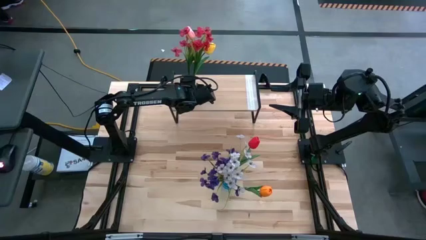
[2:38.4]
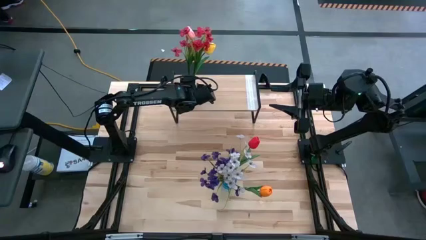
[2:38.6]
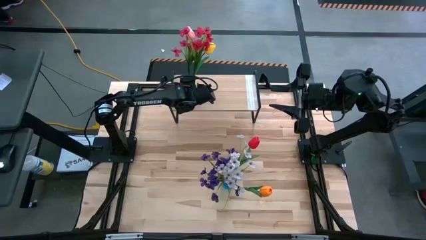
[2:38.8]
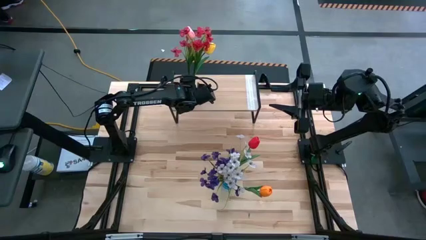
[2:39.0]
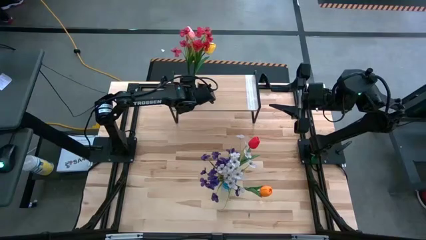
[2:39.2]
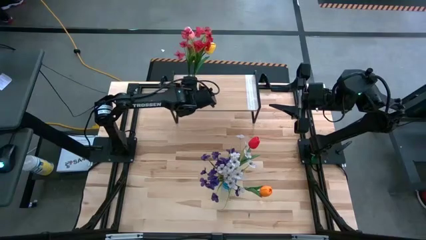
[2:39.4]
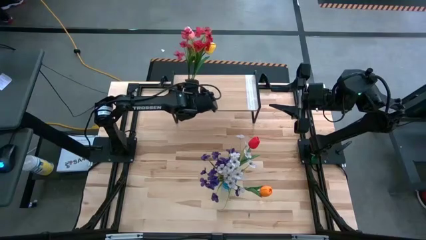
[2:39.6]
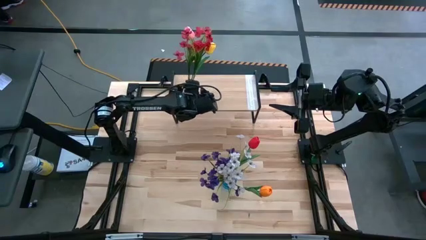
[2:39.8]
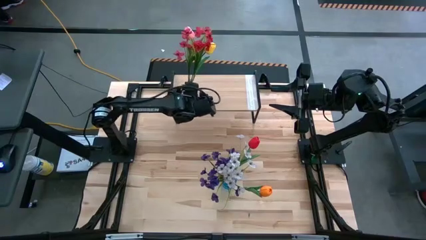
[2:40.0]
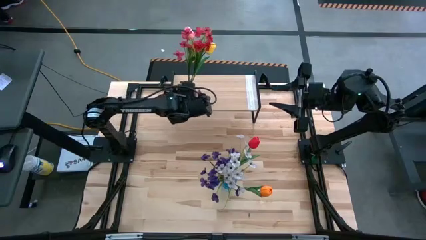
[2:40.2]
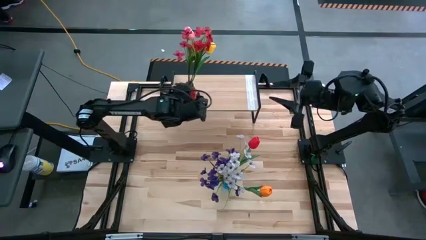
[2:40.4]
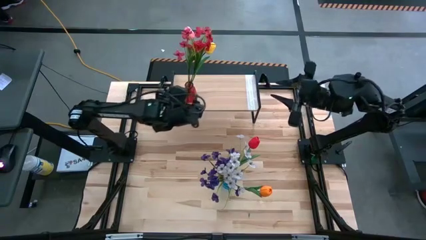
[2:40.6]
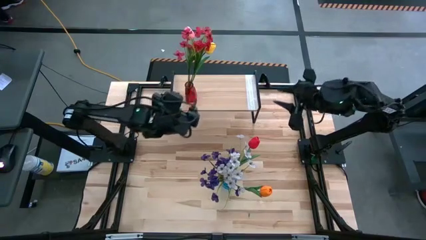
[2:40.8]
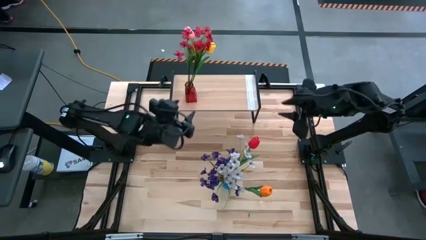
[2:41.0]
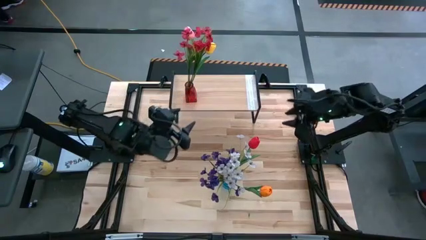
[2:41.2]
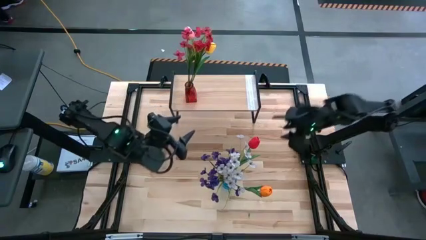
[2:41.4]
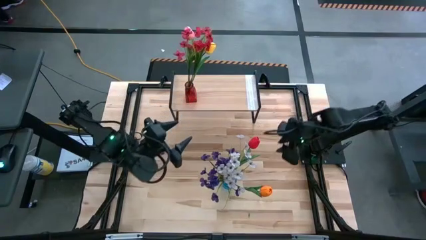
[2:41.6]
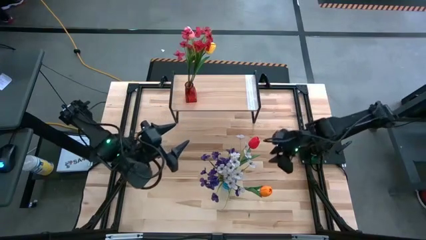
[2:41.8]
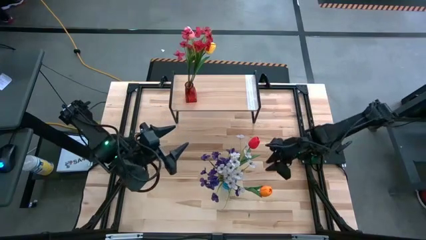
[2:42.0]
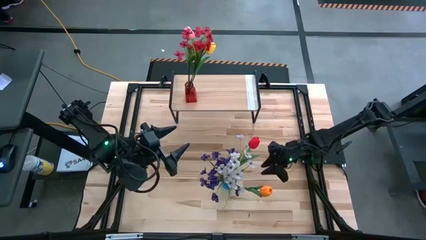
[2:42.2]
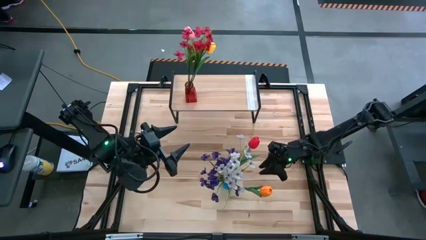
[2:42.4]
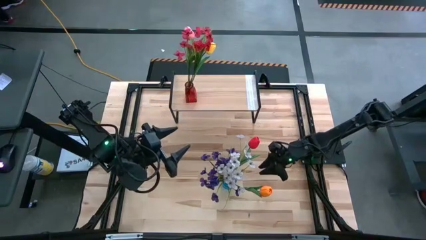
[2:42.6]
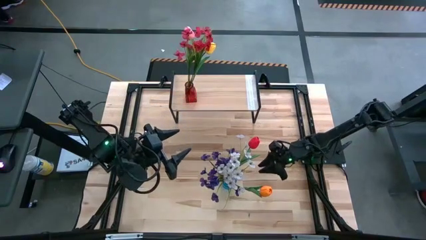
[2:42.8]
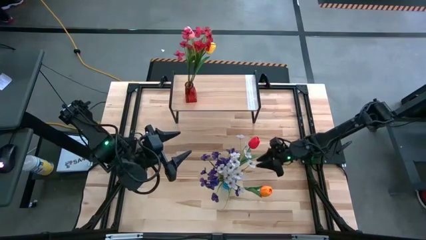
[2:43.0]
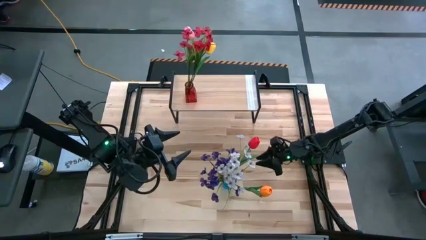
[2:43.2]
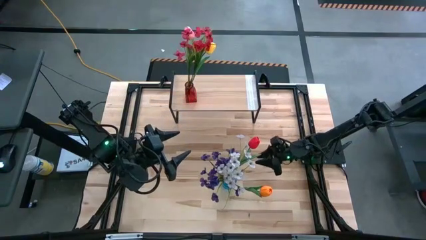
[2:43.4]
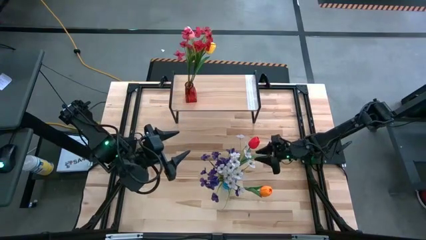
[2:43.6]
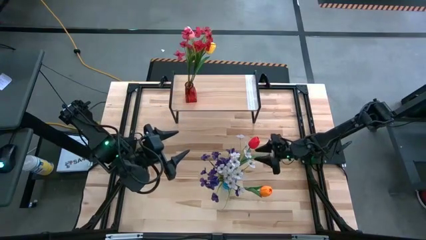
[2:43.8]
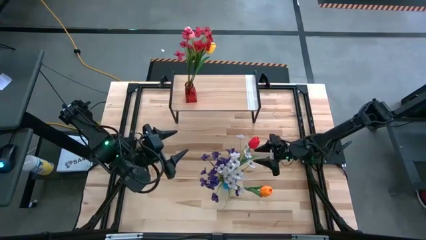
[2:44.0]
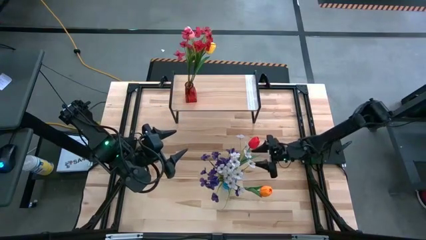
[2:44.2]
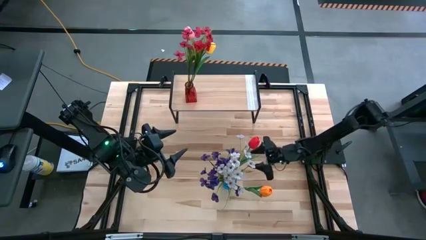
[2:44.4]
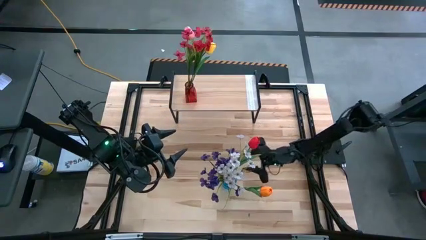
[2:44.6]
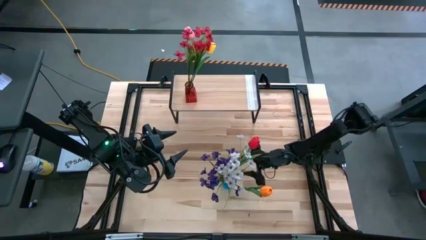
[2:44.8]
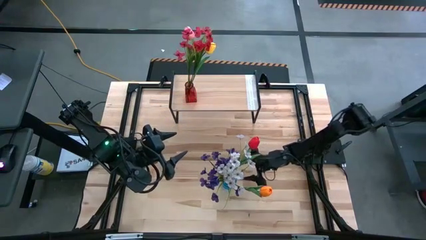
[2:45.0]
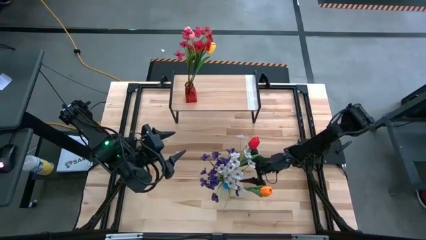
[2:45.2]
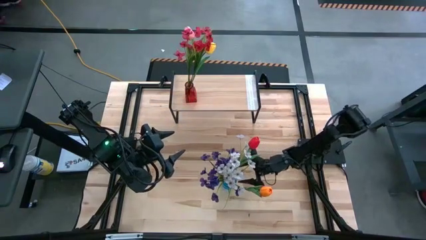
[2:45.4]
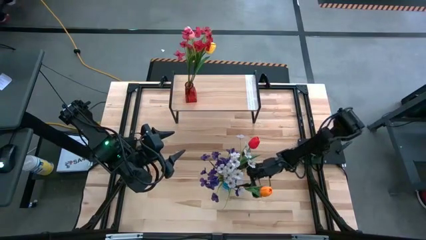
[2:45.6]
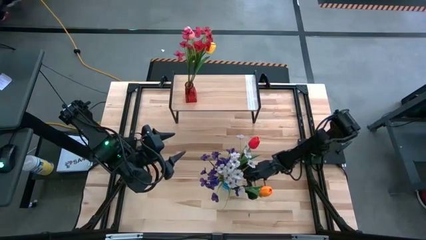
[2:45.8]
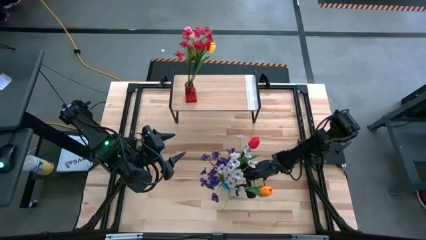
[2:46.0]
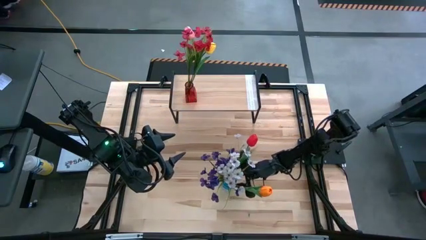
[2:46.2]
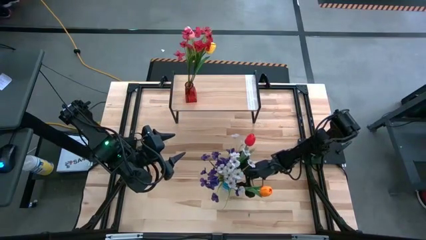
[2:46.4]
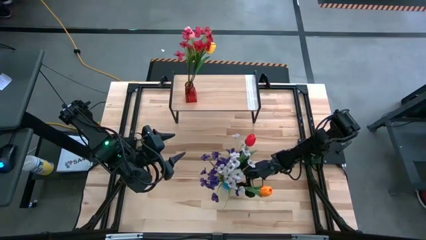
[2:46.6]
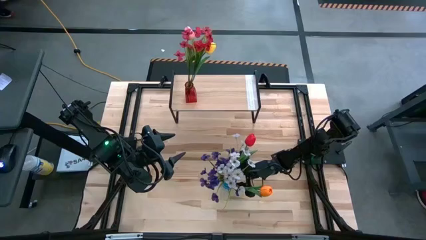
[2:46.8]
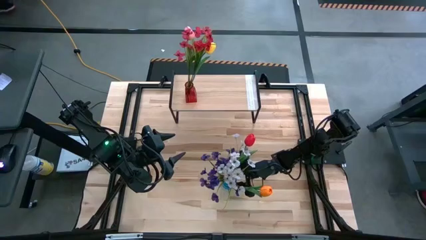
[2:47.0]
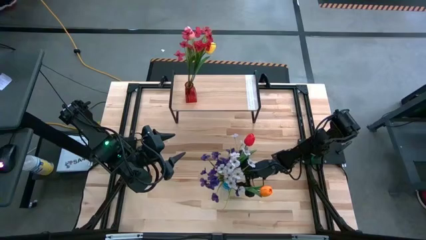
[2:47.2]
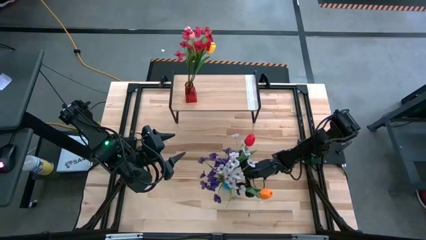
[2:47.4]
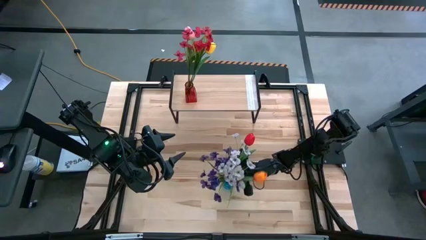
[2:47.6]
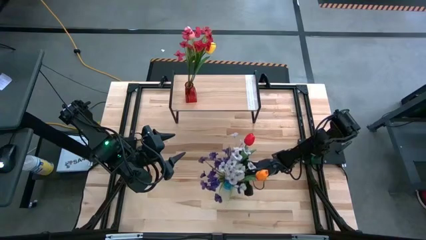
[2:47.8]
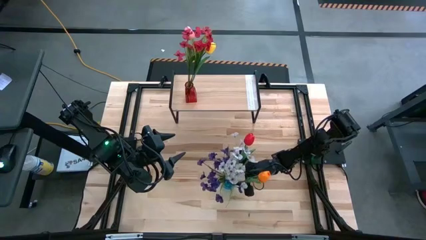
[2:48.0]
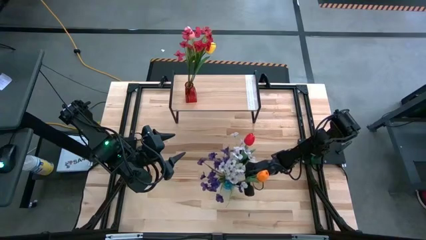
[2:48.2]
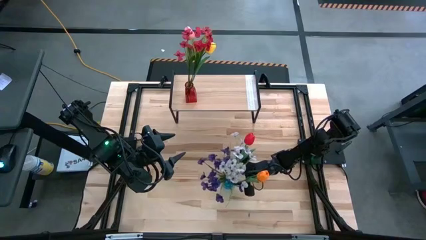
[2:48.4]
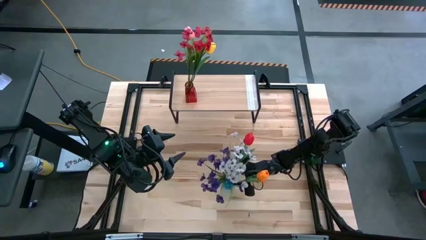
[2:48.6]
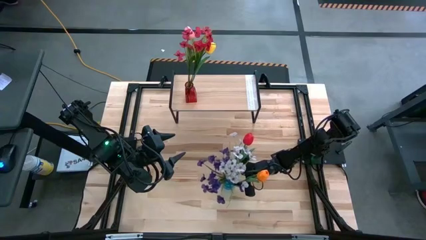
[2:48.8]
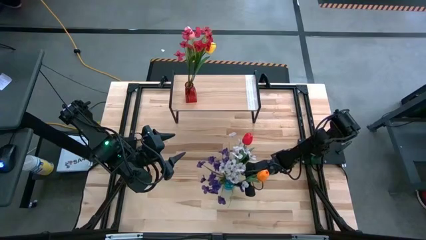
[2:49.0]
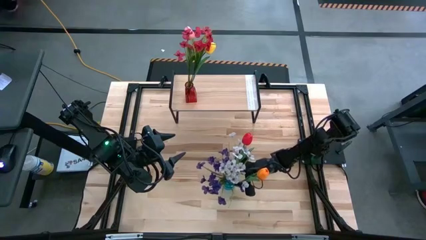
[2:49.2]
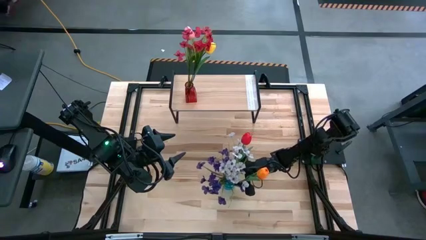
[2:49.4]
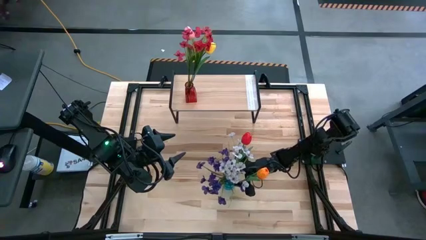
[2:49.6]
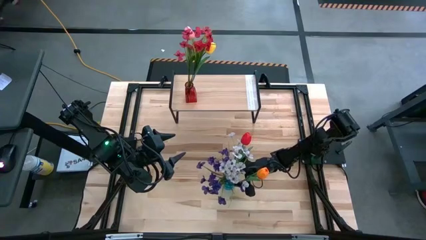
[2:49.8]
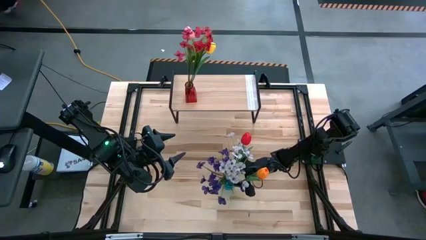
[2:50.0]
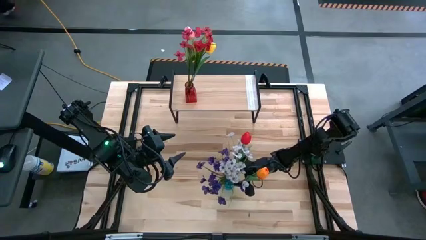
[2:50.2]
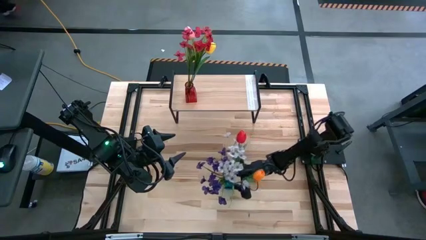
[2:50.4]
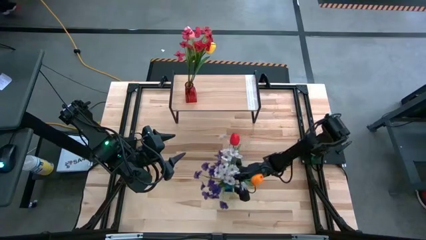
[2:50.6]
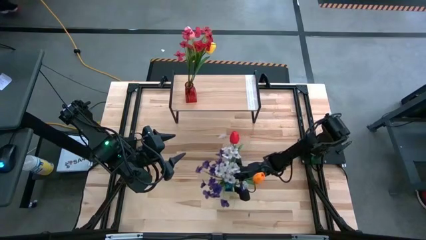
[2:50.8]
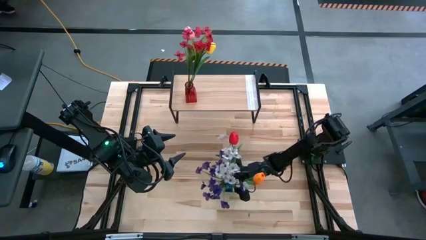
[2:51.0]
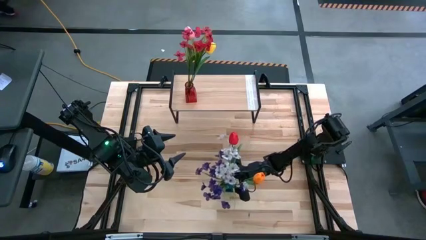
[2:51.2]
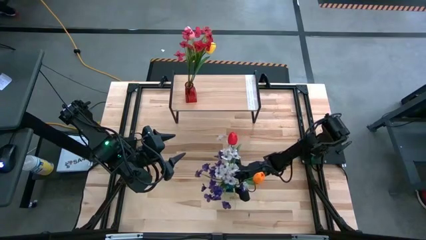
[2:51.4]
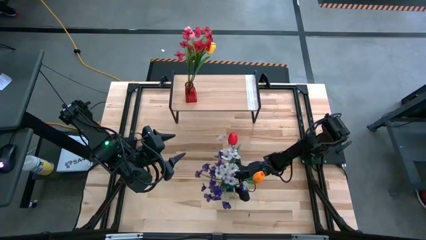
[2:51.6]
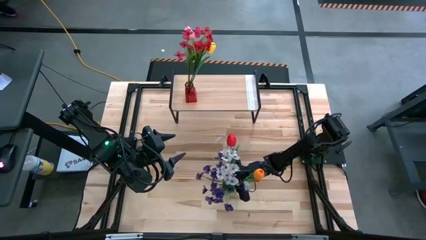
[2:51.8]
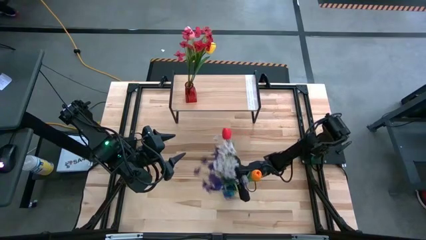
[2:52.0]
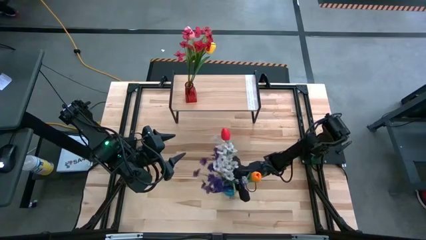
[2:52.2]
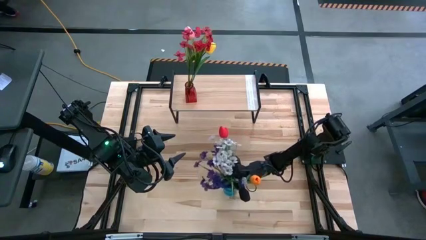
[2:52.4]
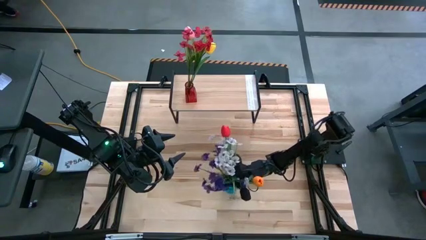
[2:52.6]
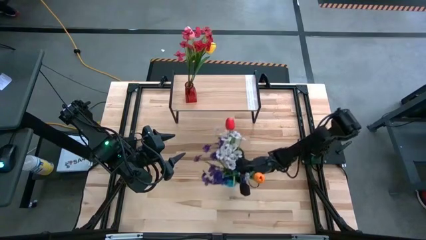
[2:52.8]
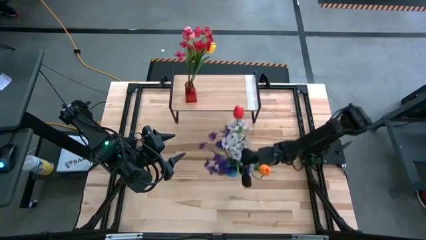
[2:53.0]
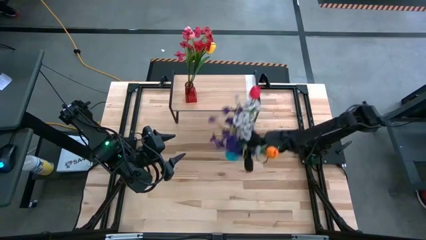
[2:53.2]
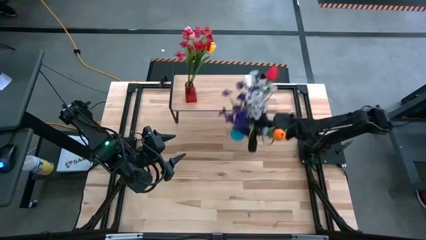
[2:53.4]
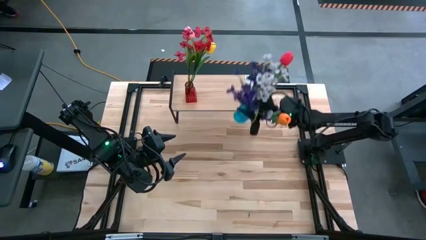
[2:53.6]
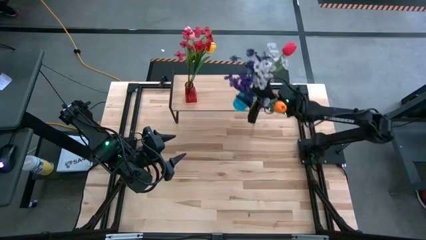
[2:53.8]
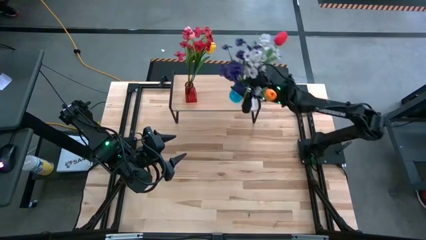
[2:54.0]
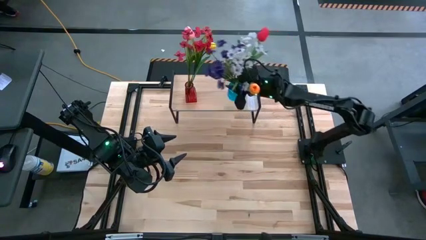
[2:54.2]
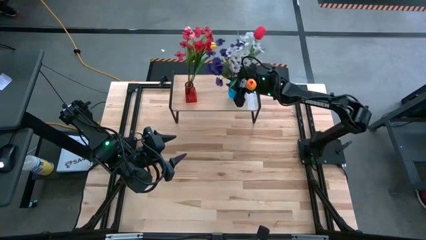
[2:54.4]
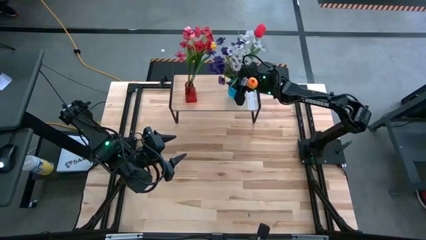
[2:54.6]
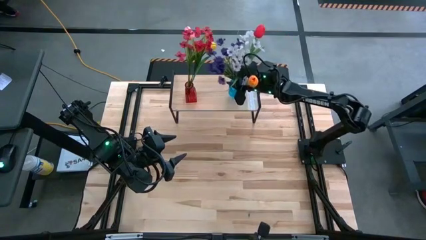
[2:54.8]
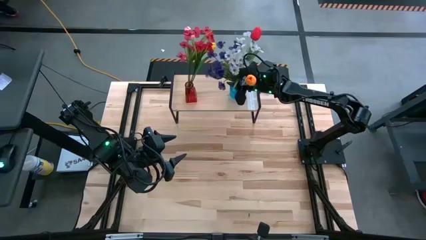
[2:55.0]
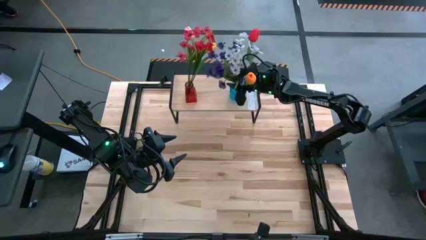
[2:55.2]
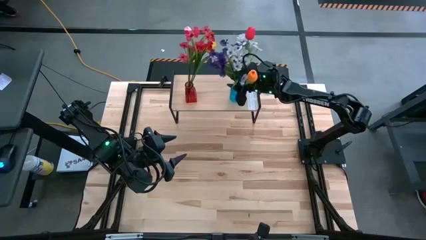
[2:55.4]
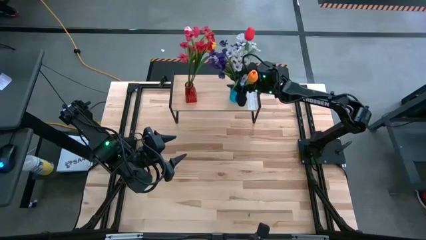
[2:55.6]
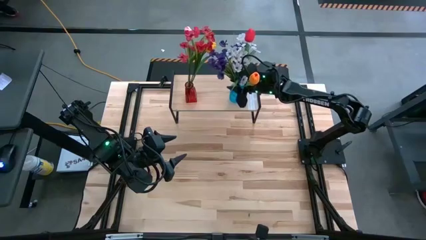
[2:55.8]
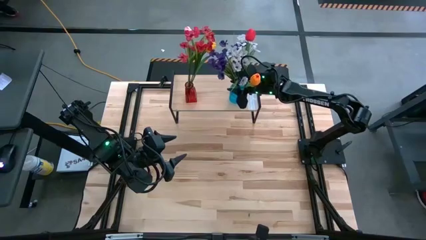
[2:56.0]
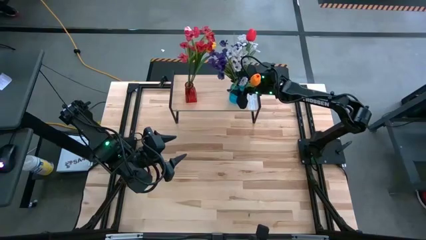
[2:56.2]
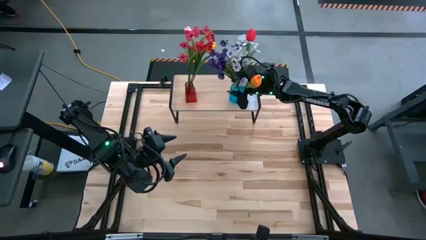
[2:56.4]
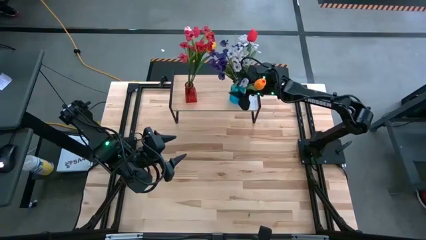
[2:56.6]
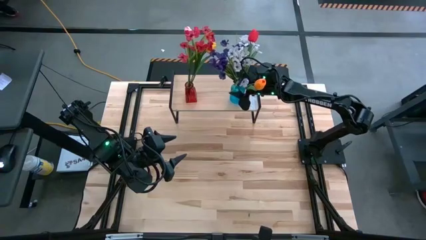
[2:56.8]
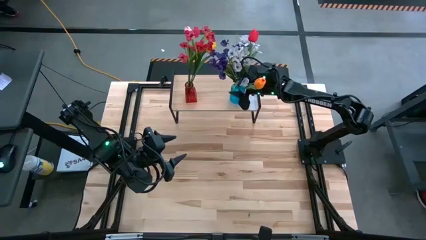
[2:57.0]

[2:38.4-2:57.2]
Task: Pick and place flowers into a vace then onto a shelf
Put the blue vase on the shelf
